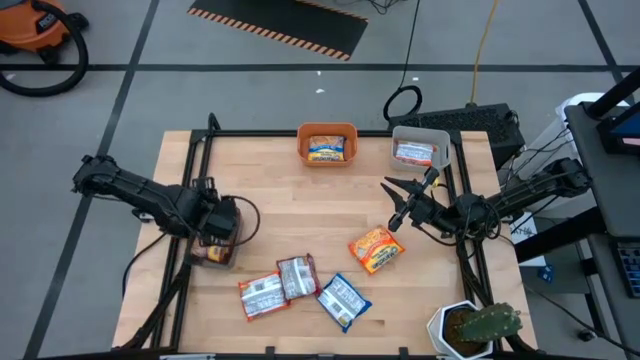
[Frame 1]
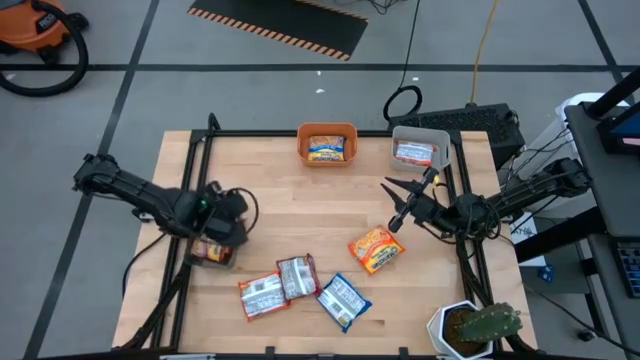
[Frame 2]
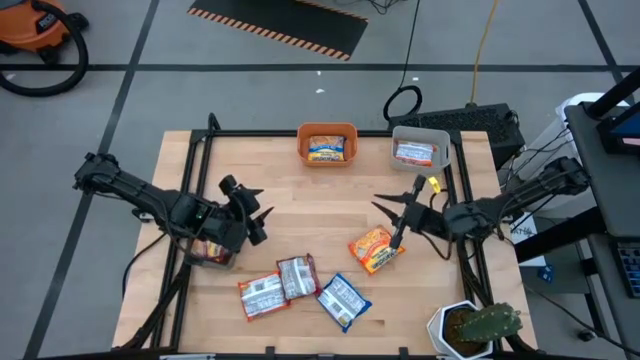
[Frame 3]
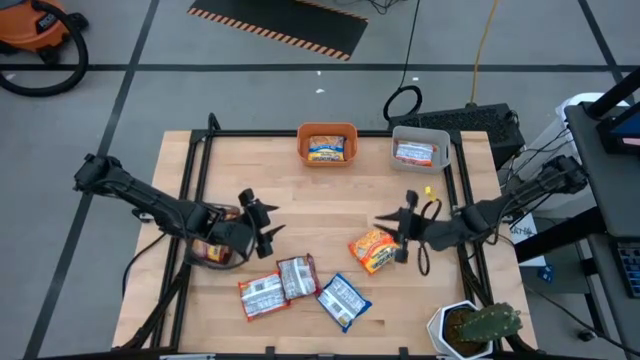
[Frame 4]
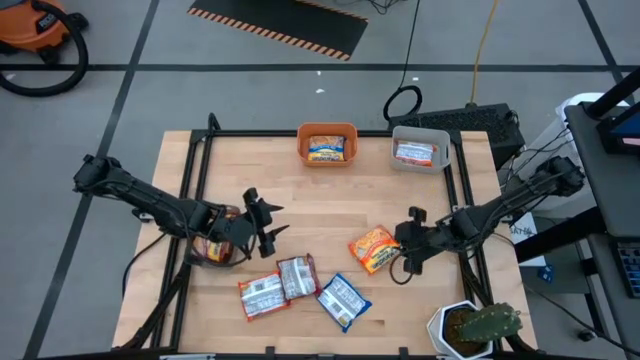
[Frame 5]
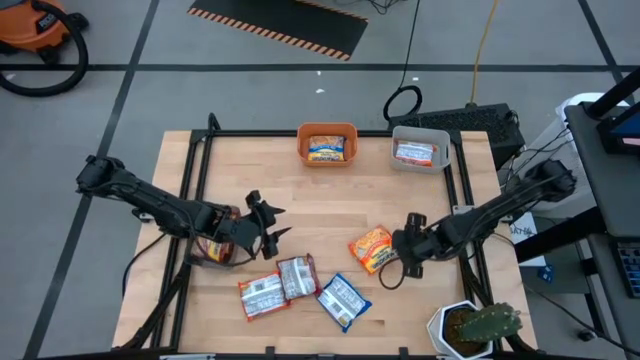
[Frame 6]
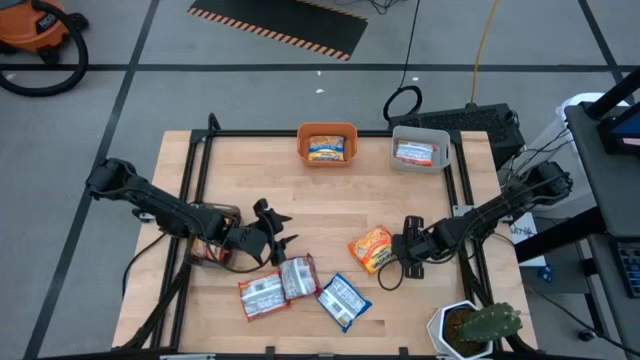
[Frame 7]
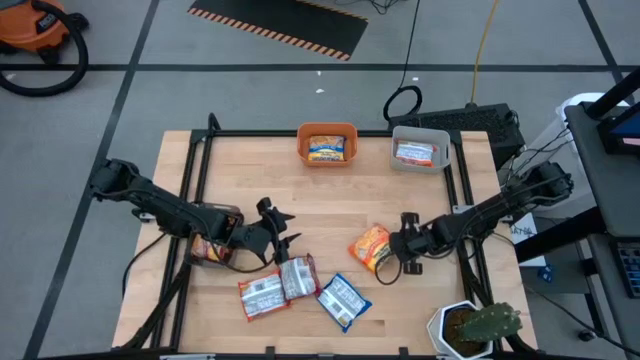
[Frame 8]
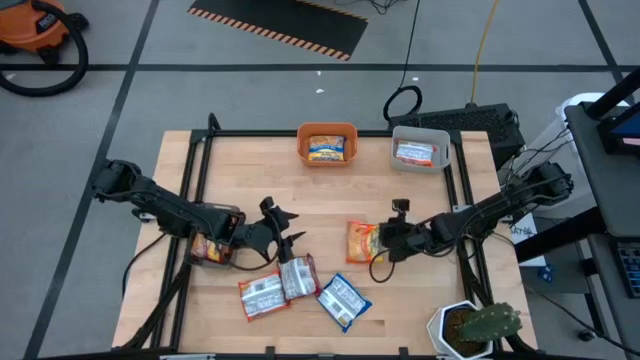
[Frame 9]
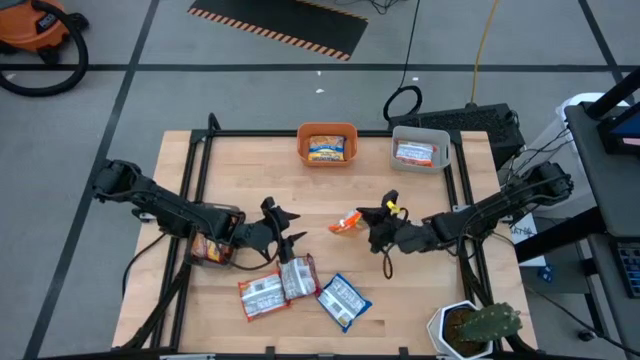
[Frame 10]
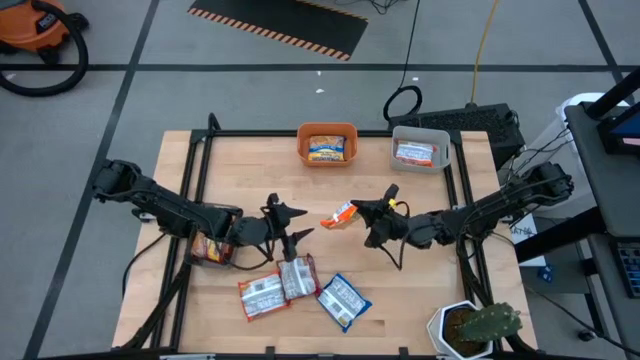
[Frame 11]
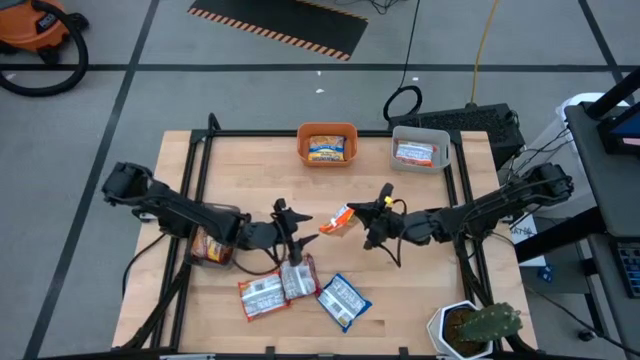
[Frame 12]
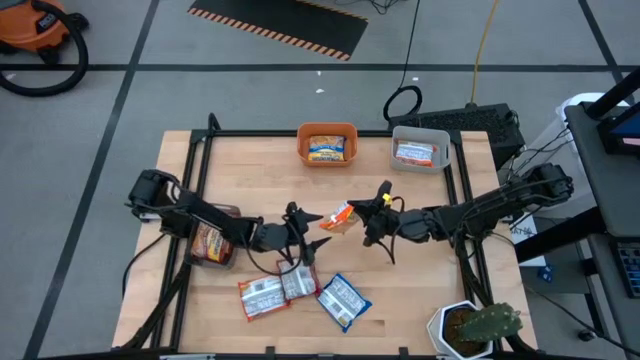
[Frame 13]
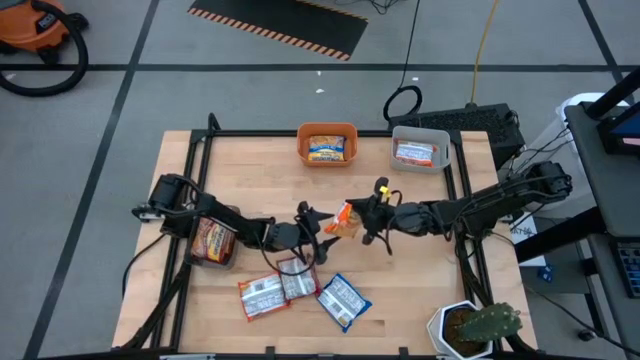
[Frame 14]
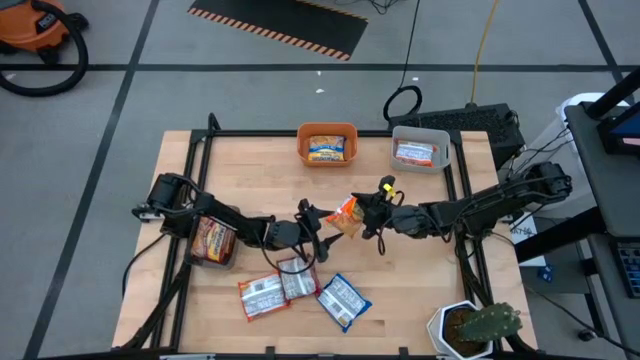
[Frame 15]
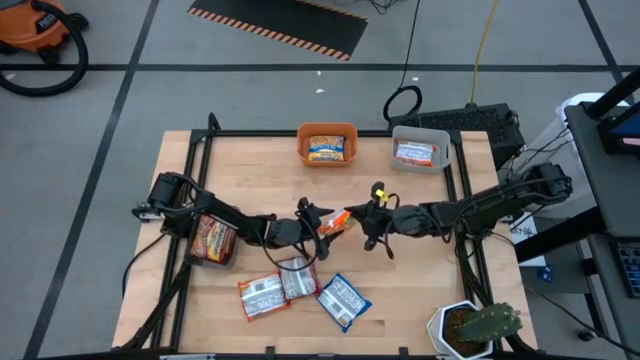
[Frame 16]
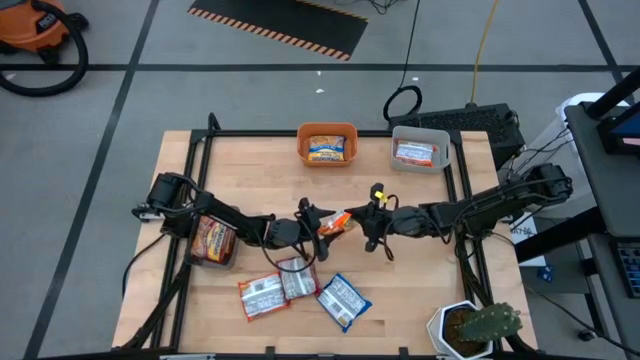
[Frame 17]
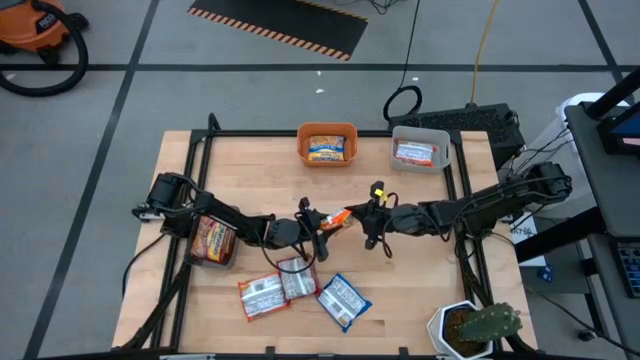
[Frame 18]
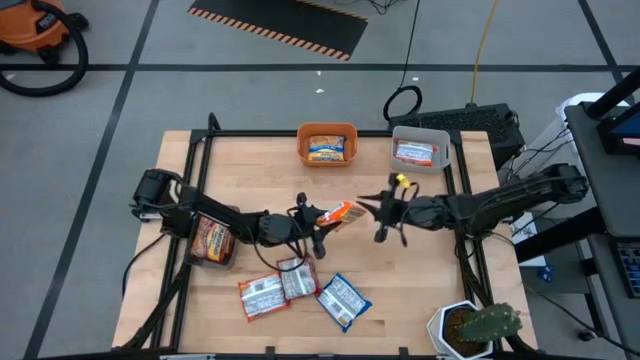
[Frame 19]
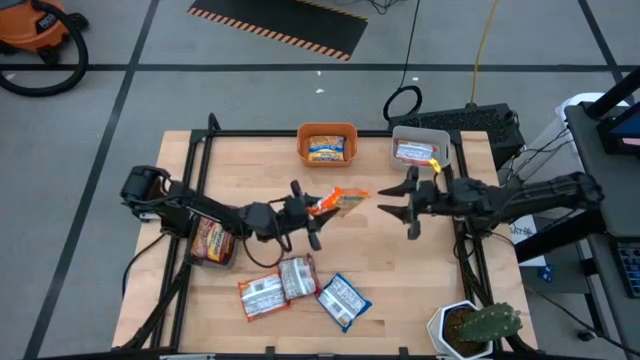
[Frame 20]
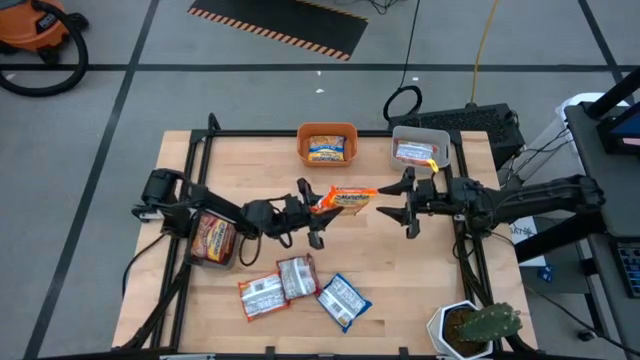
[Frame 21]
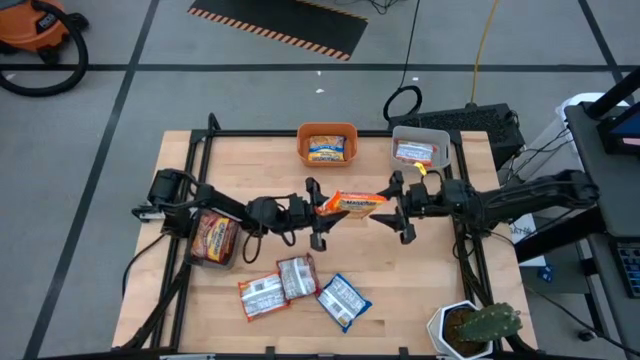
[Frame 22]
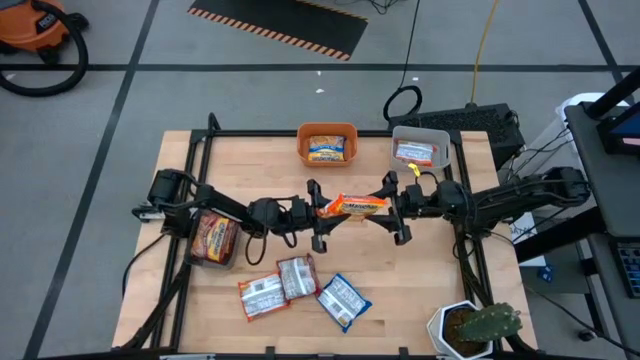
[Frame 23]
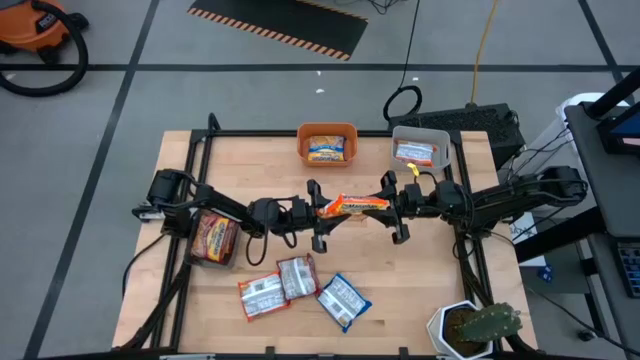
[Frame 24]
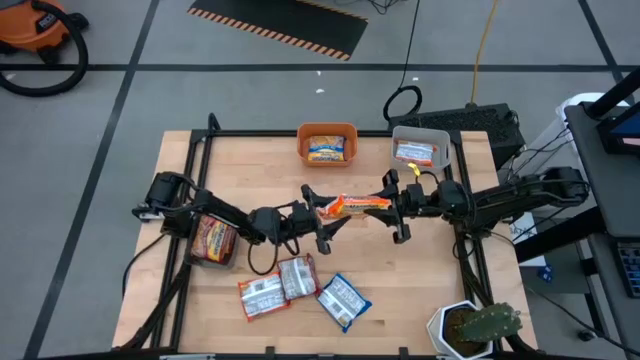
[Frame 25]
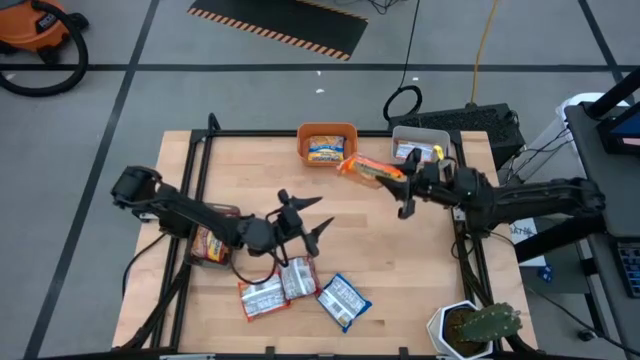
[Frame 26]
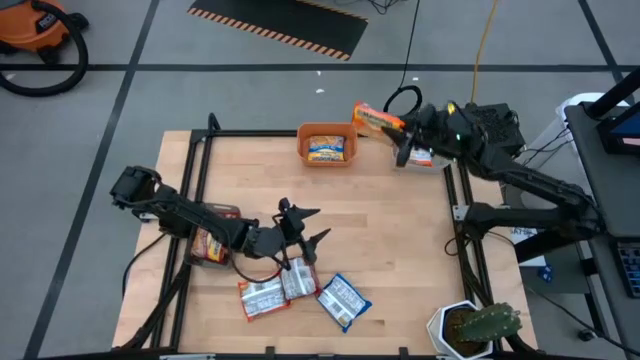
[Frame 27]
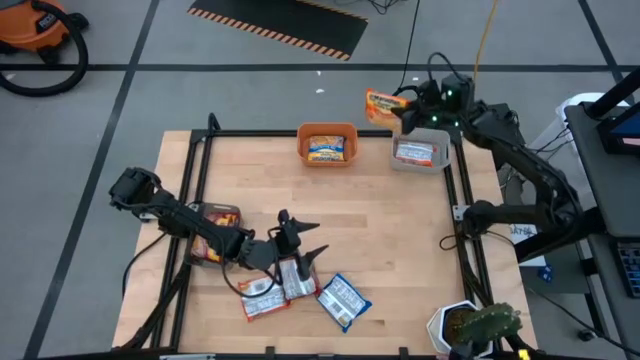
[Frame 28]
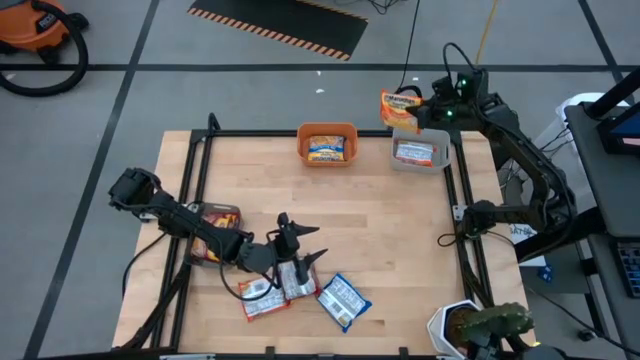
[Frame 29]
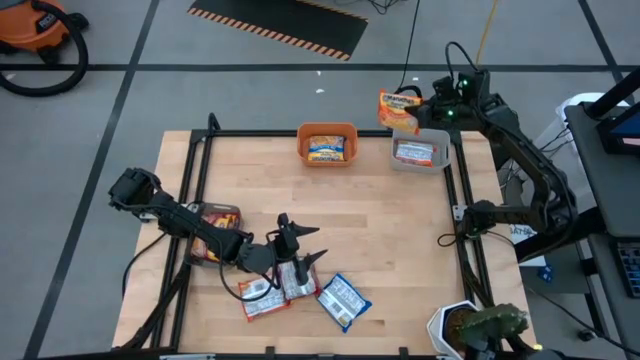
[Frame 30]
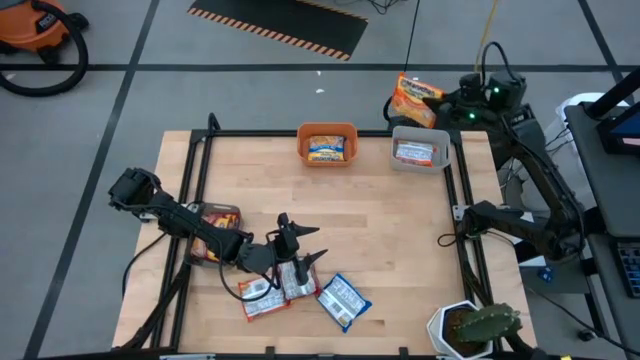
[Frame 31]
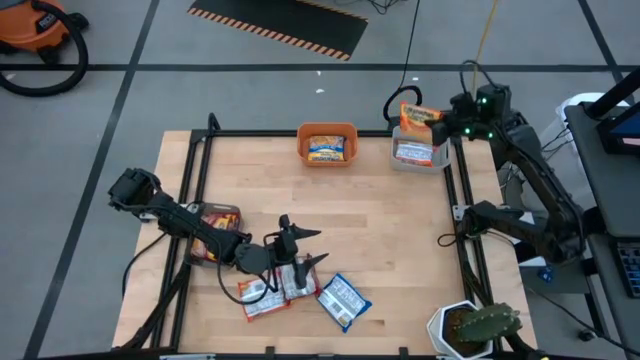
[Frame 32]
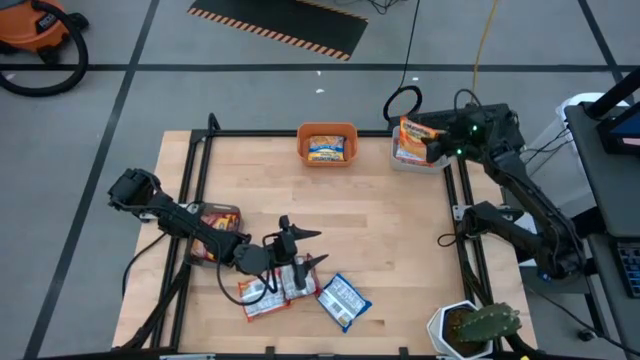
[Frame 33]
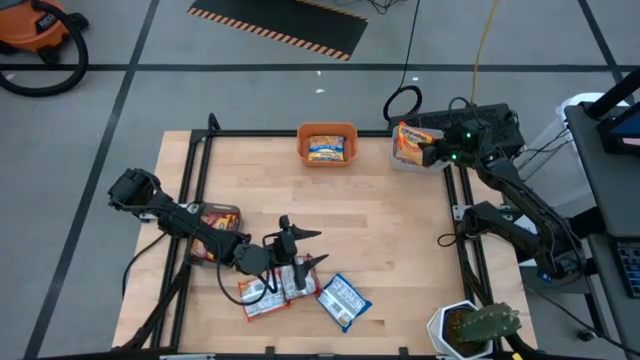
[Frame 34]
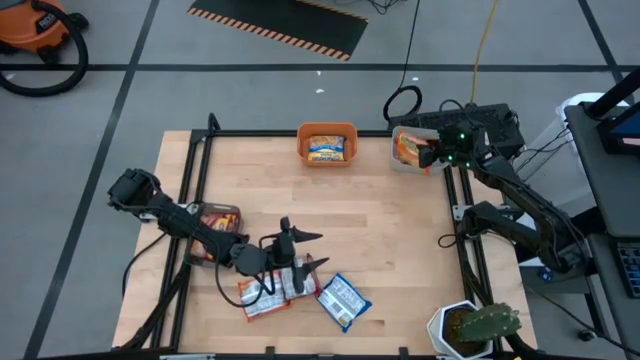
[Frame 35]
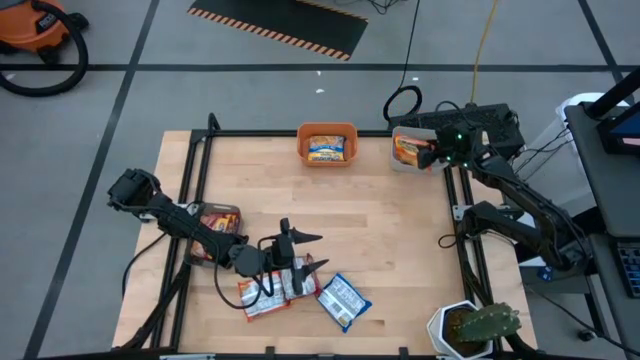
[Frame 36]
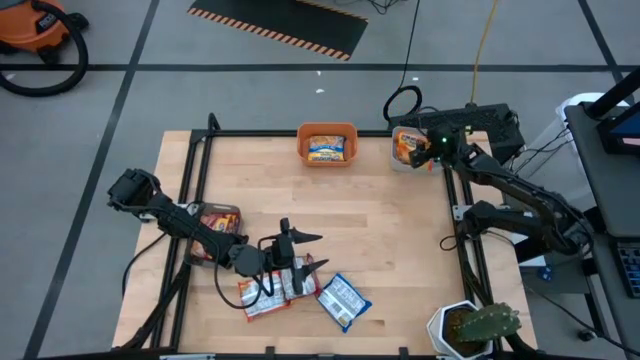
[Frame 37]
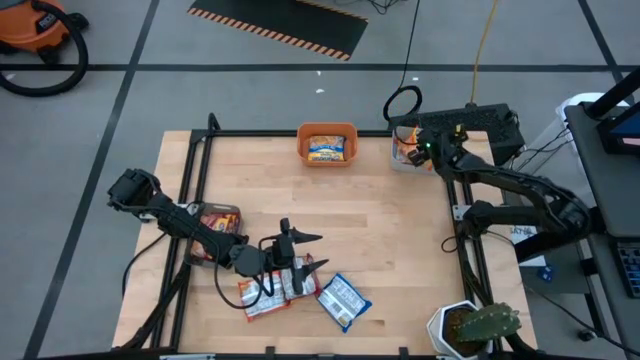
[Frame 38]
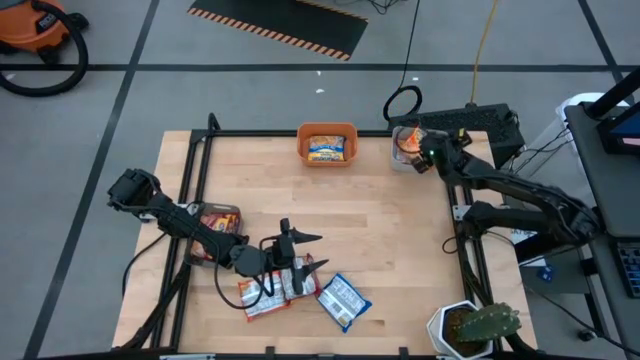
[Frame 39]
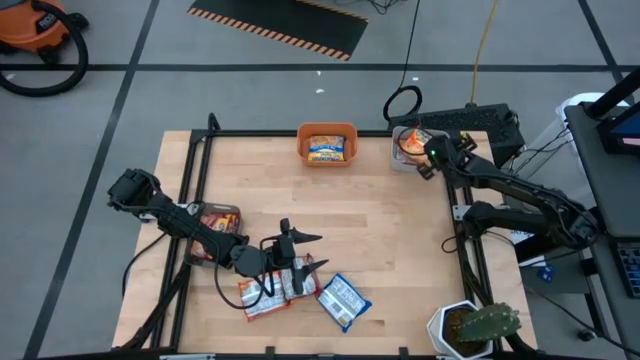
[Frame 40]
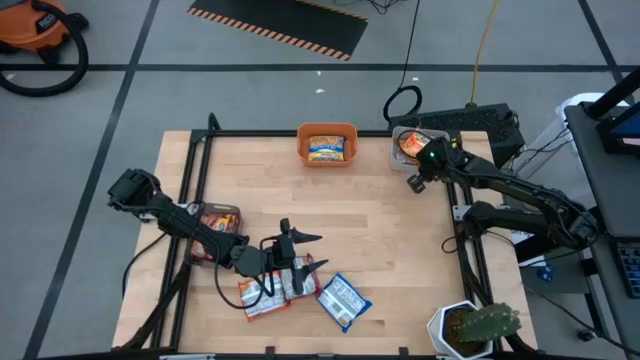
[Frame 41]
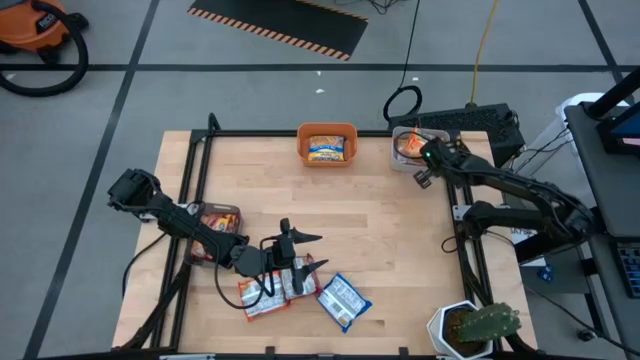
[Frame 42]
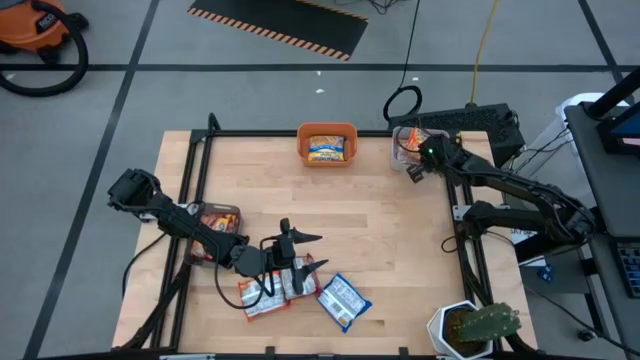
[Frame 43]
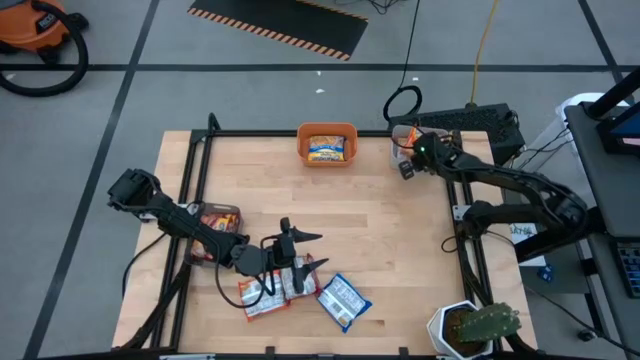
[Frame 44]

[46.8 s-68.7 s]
Task: Sort Maruchan noodles
Put the top orange noodle pack into the gray bin
